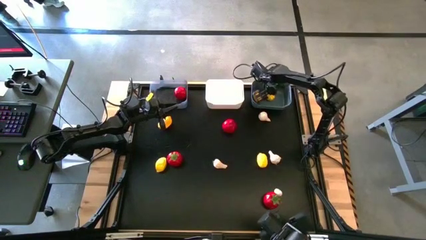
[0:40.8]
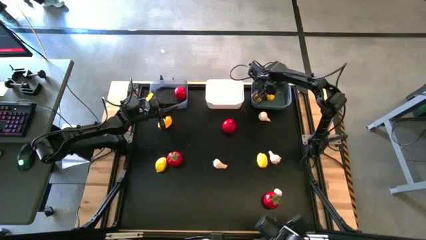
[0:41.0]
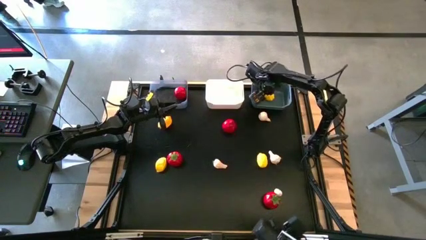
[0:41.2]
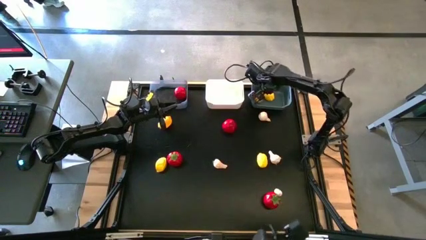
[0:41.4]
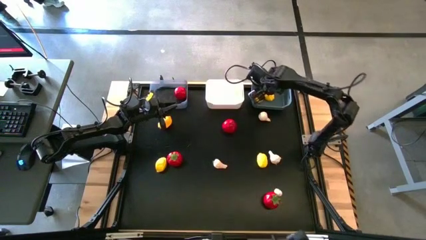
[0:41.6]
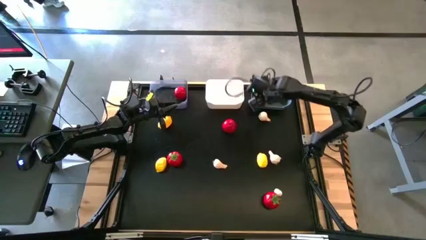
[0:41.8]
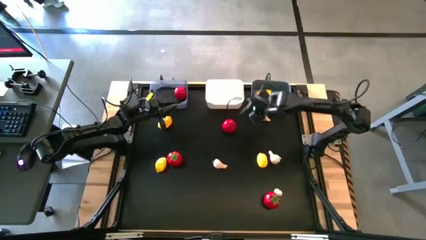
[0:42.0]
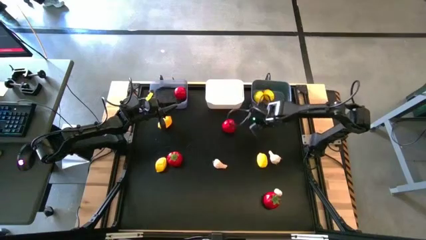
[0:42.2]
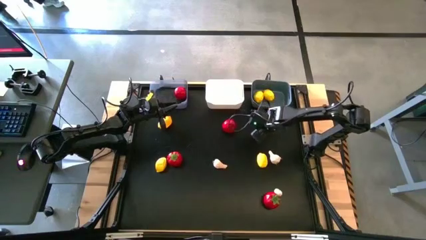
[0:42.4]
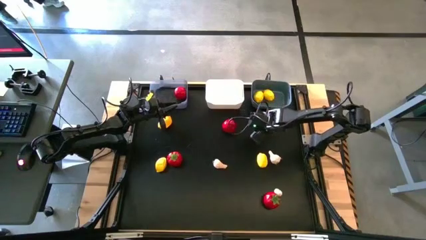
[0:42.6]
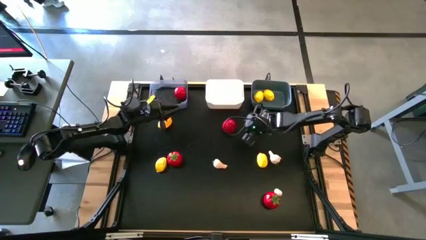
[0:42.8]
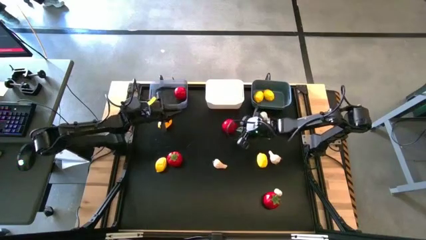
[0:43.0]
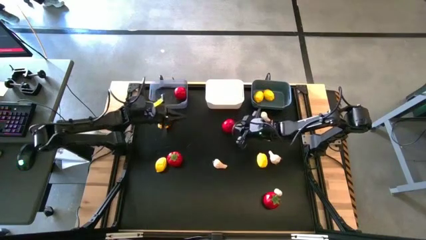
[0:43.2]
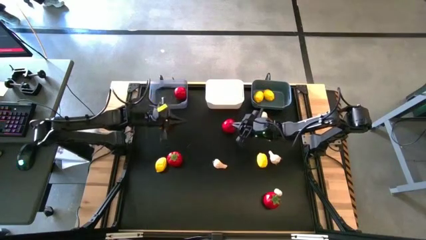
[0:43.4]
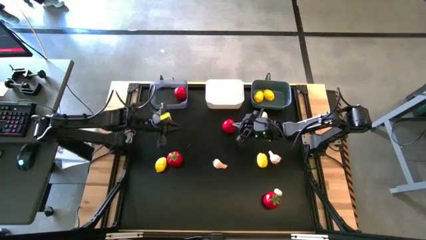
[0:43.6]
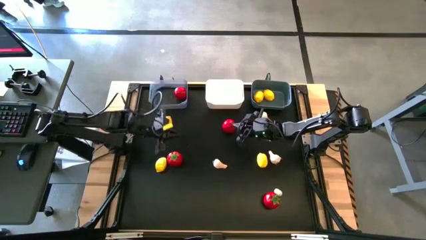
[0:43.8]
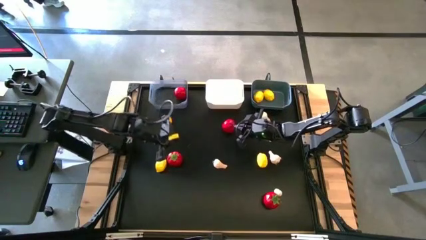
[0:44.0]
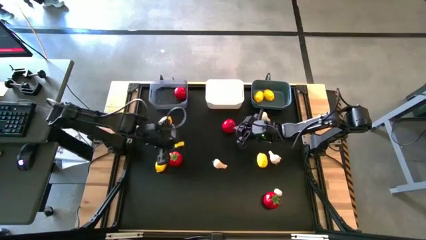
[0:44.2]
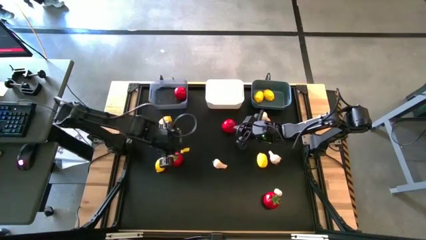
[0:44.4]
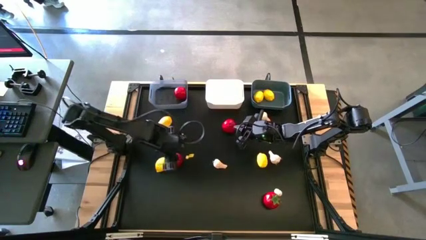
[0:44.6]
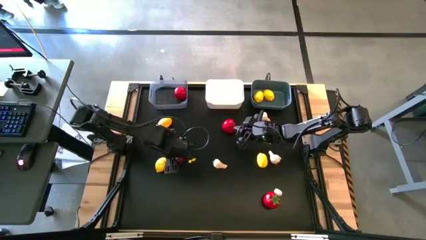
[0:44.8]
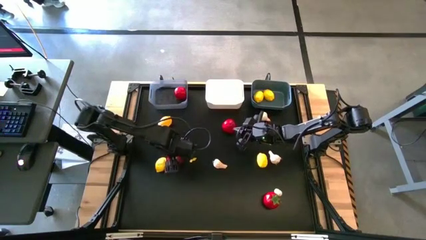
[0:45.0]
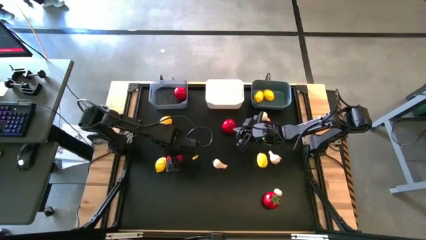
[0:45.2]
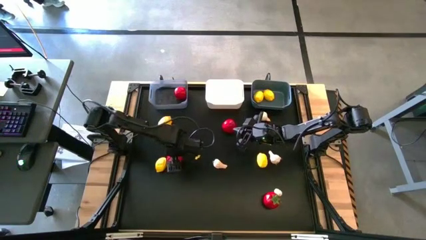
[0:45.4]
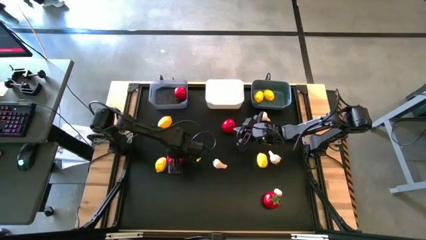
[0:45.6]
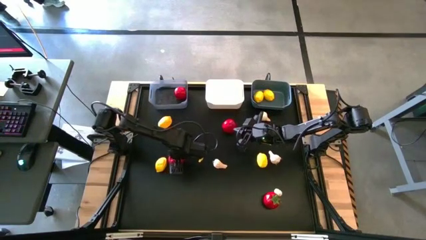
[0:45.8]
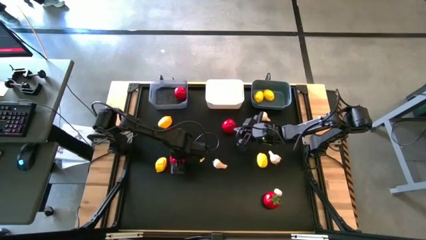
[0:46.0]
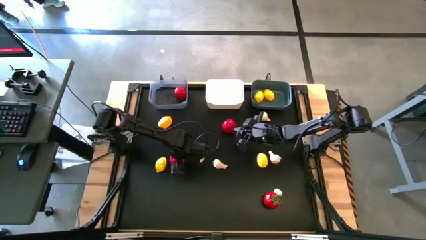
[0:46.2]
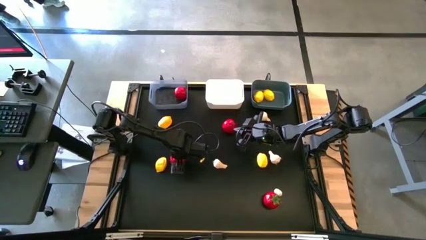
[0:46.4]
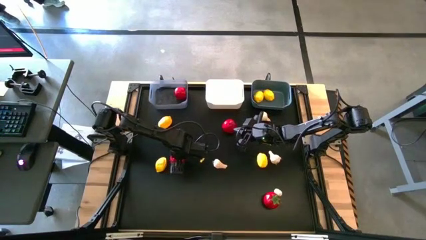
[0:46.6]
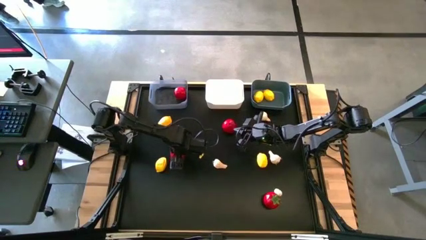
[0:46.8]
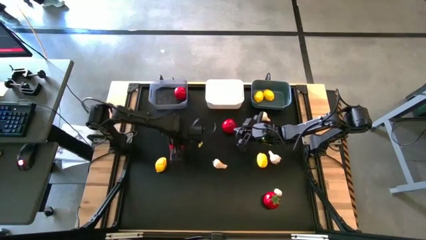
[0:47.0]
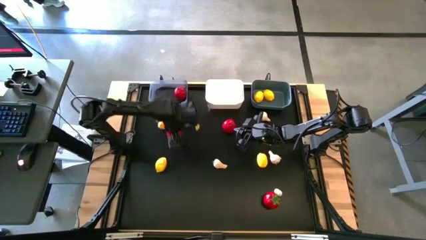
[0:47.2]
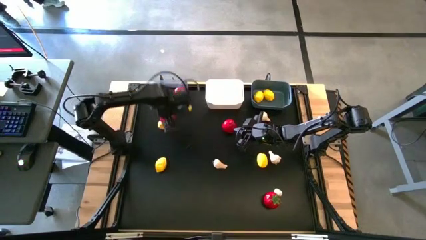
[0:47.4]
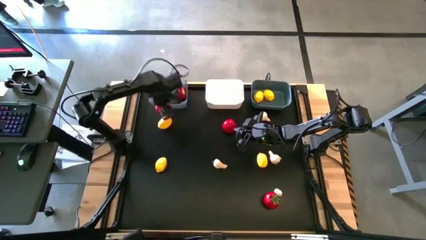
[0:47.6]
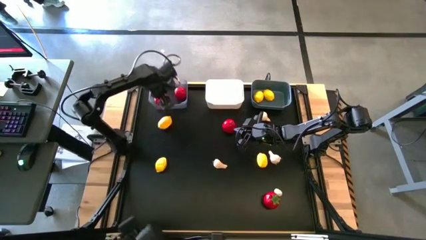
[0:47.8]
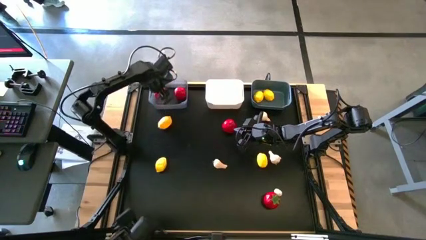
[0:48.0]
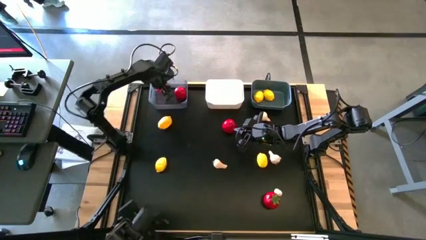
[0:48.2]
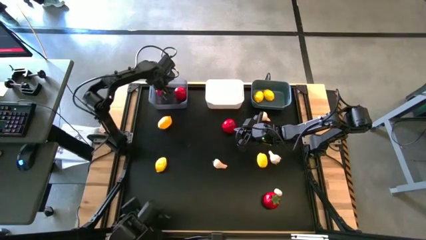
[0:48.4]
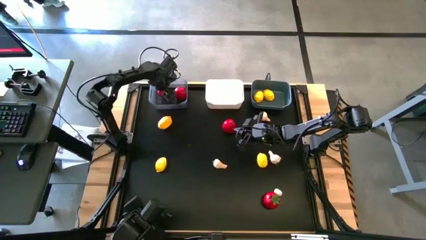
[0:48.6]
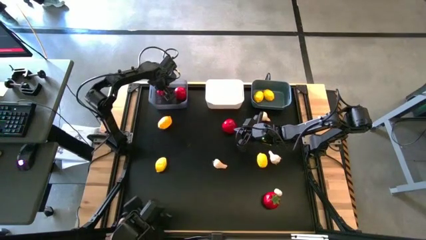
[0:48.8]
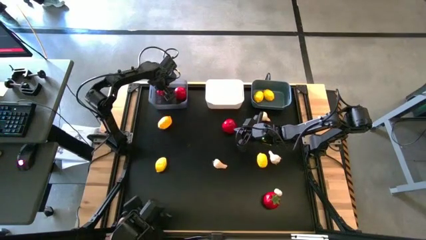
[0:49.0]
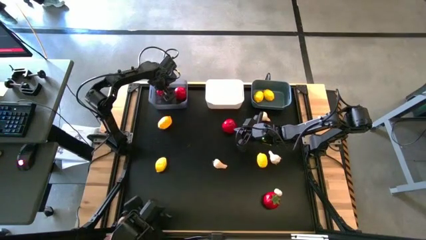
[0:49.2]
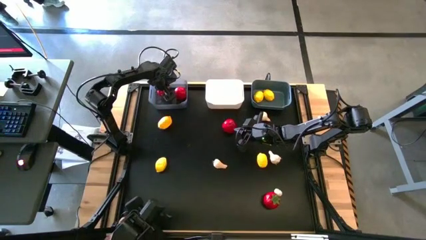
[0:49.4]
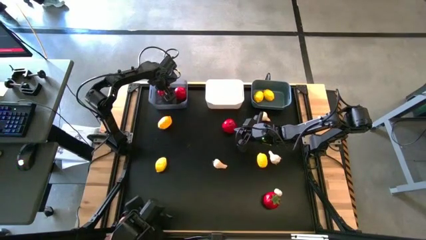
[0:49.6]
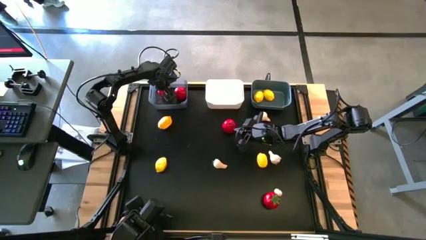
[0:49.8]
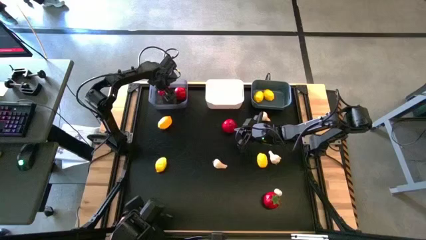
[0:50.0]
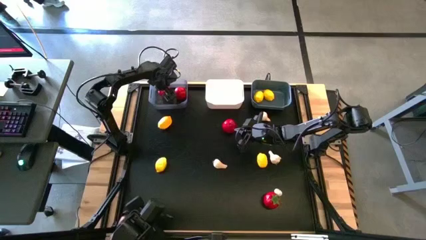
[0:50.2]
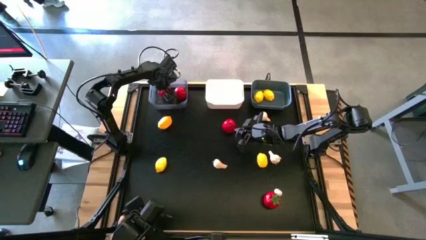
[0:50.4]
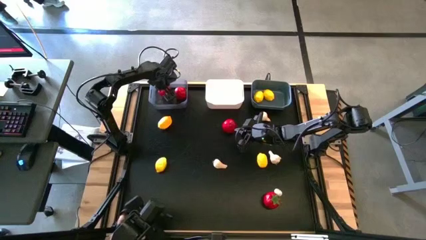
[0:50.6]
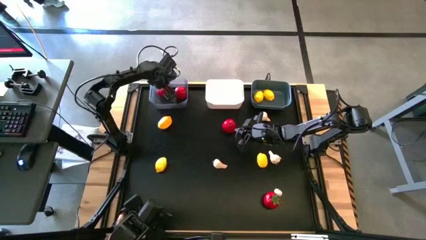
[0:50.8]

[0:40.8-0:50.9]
Task: Sort produce into baskets
Put the tomato into the black bin

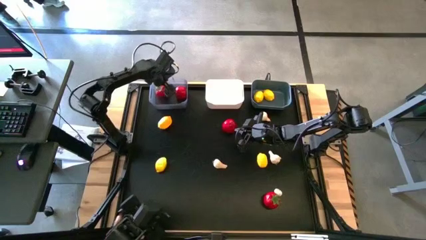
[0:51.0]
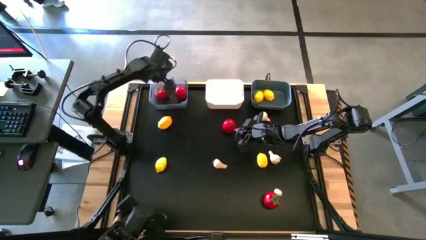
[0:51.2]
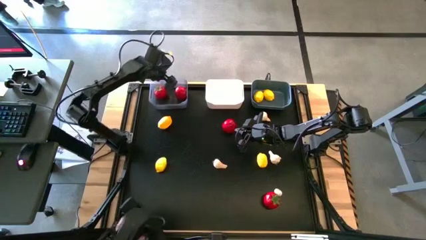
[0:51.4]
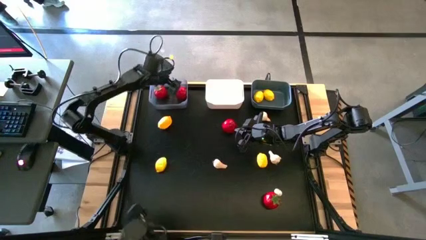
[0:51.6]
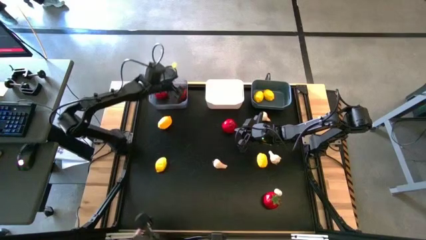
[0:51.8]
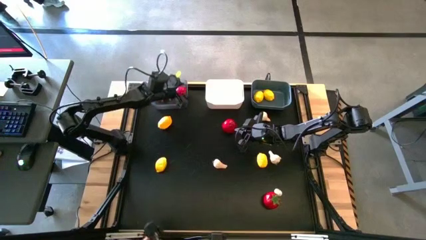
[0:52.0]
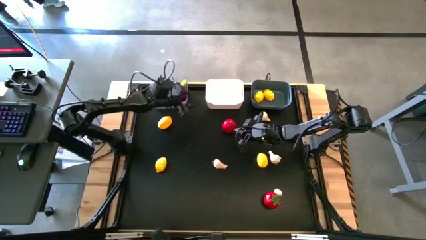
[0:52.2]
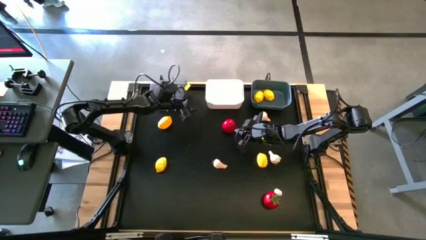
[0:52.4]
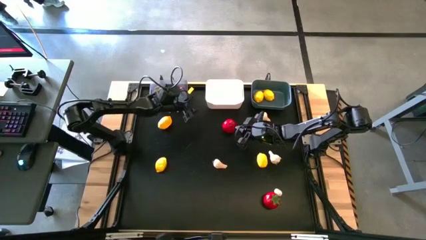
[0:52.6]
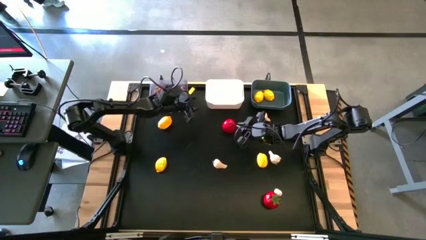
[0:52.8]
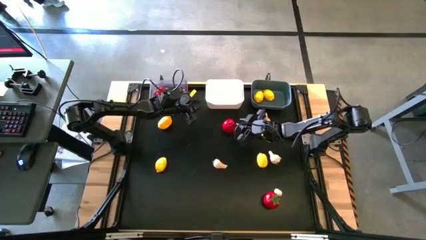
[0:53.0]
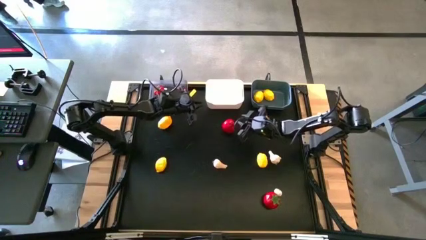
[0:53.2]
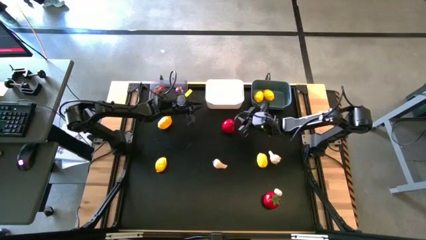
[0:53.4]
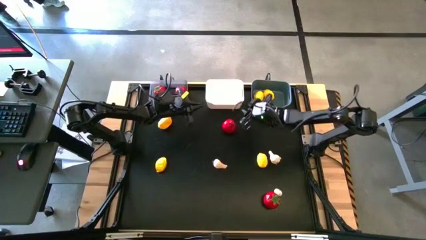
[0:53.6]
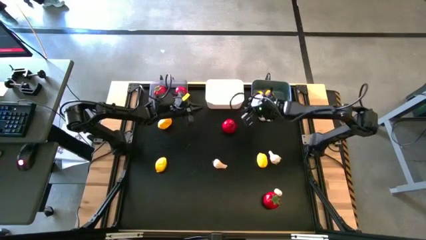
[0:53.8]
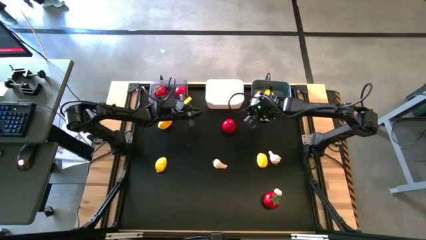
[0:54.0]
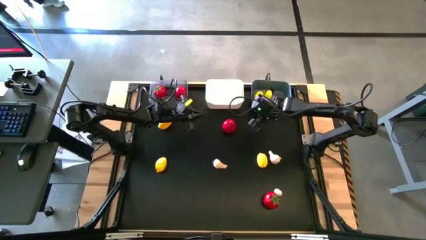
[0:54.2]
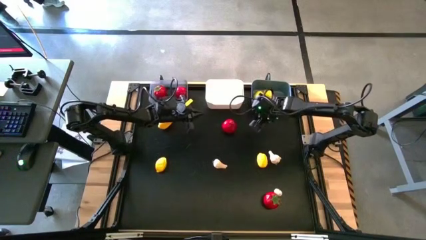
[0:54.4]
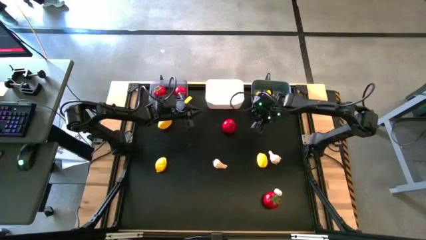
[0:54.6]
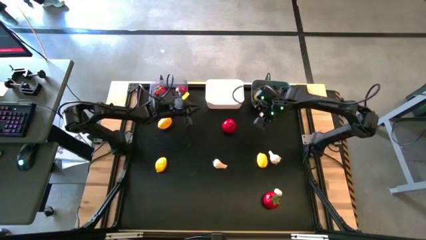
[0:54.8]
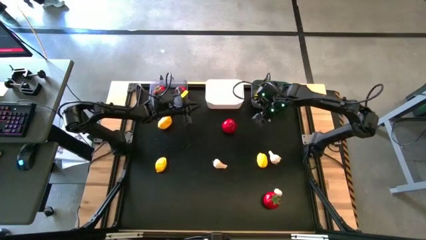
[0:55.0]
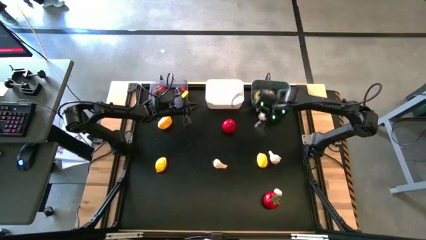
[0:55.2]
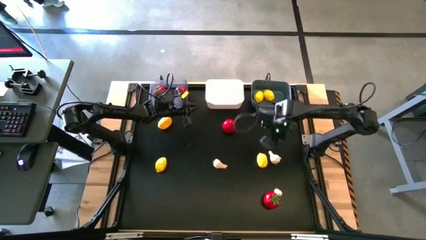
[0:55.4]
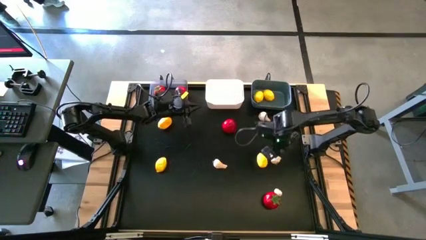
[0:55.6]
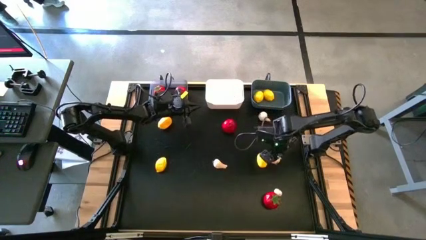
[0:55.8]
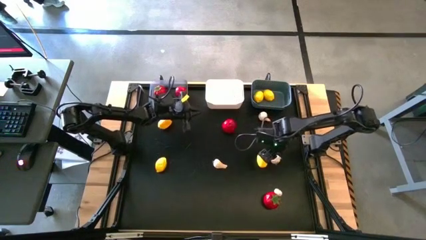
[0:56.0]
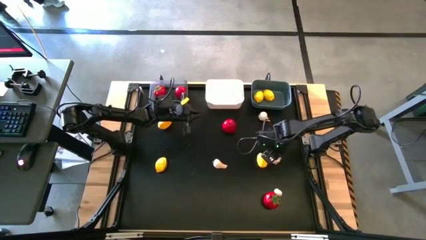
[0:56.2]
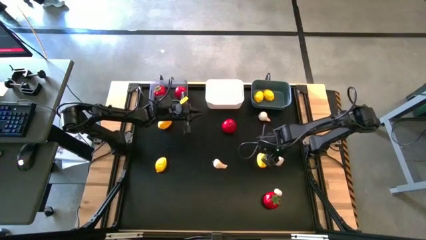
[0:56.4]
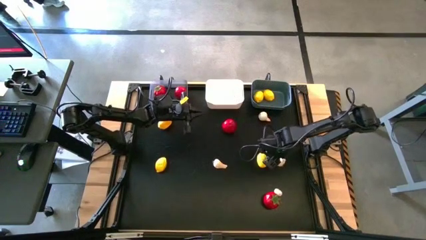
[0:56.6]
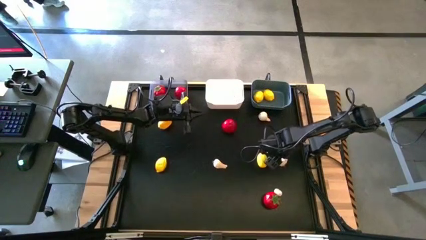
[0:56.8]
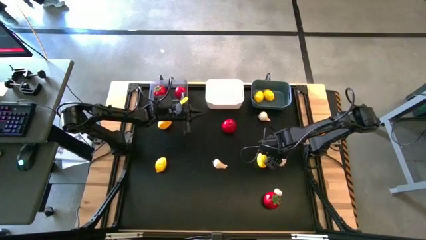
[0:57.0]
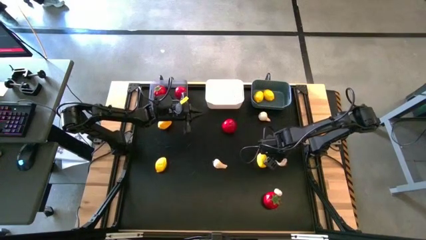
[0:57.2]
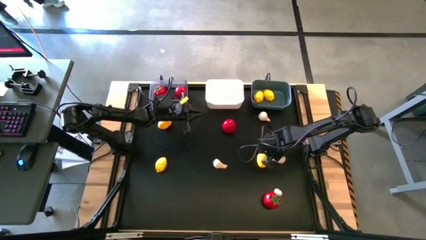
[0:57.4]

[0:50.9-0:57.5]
Put the garlic into the white bin
